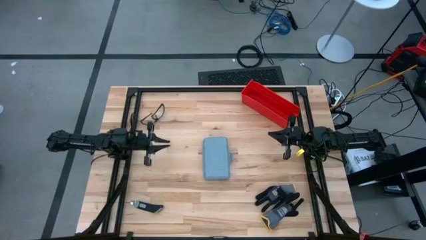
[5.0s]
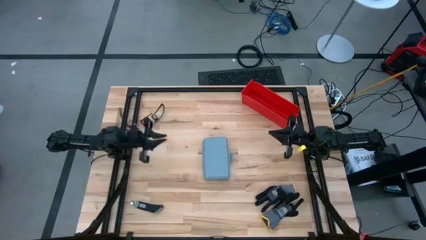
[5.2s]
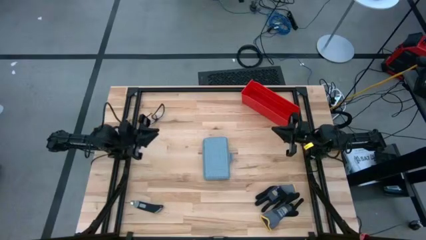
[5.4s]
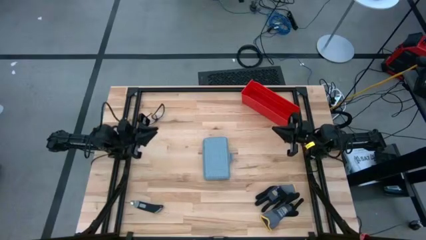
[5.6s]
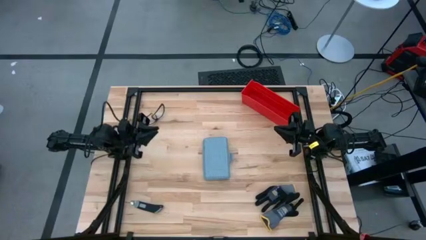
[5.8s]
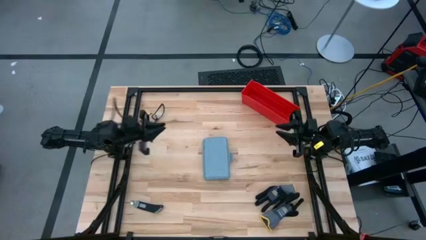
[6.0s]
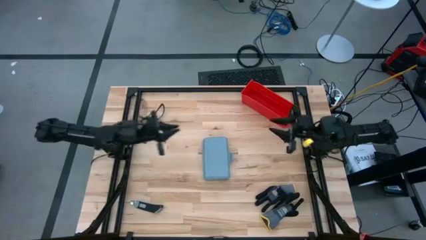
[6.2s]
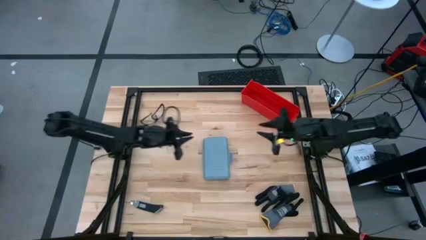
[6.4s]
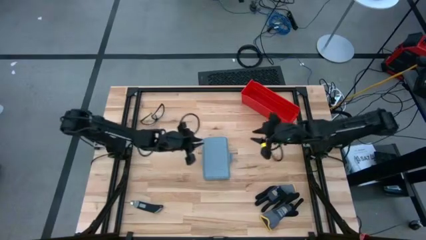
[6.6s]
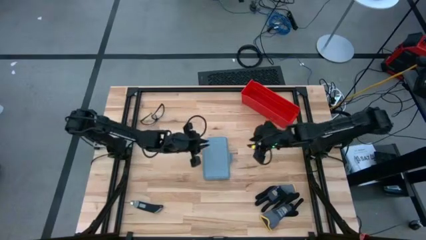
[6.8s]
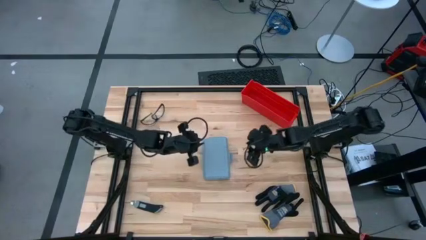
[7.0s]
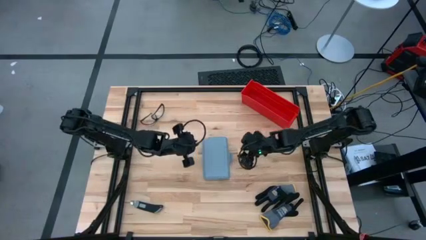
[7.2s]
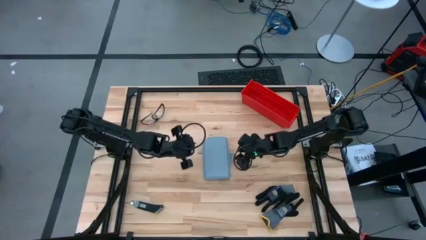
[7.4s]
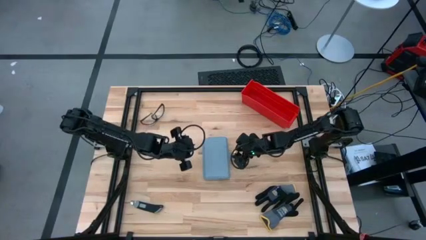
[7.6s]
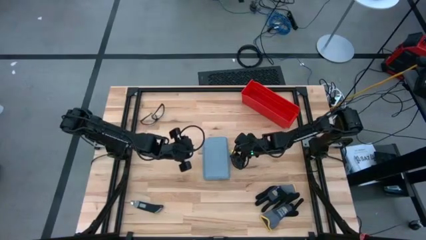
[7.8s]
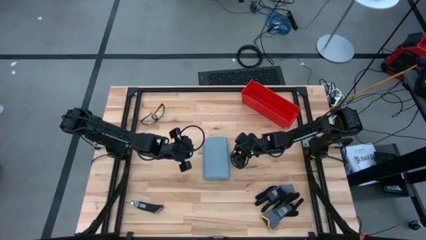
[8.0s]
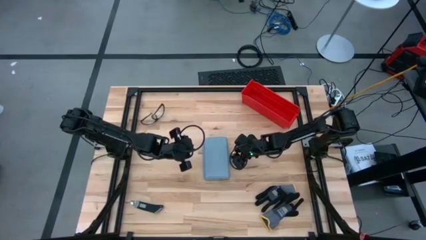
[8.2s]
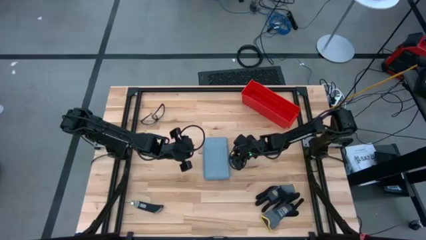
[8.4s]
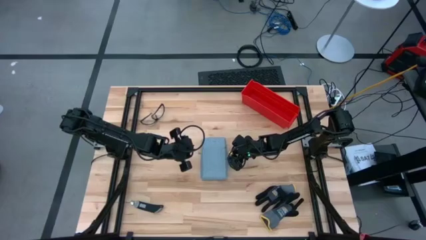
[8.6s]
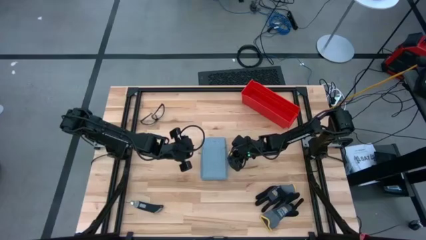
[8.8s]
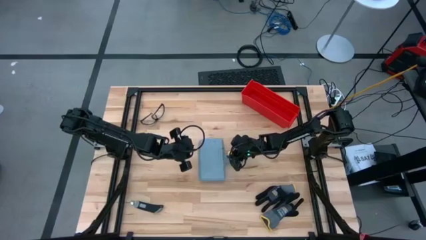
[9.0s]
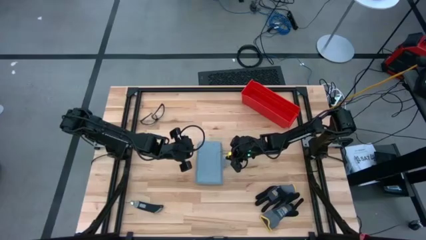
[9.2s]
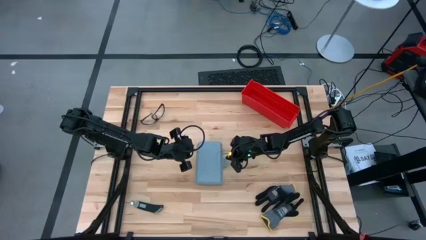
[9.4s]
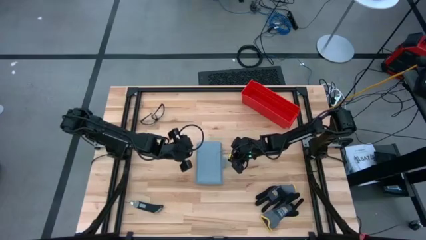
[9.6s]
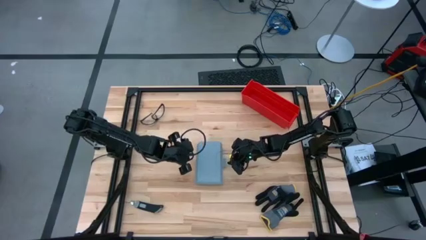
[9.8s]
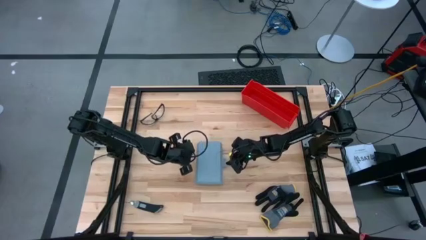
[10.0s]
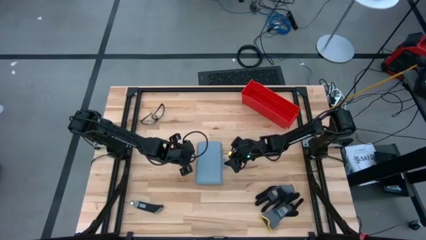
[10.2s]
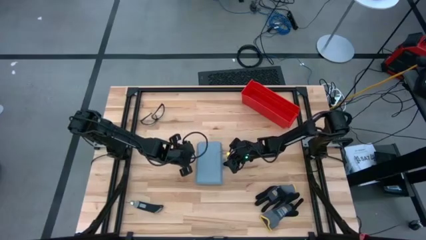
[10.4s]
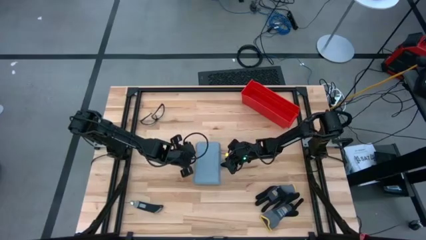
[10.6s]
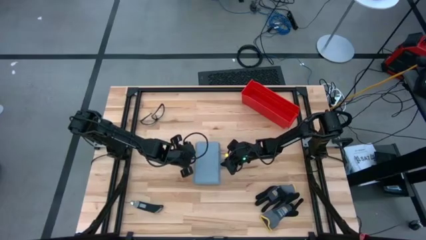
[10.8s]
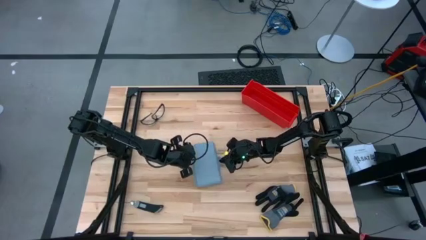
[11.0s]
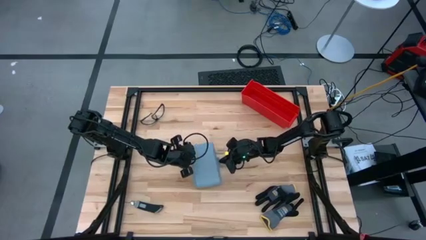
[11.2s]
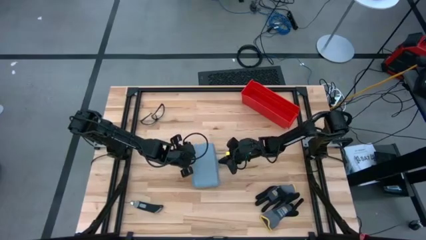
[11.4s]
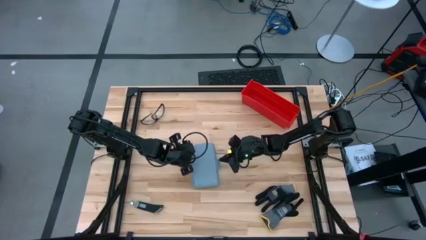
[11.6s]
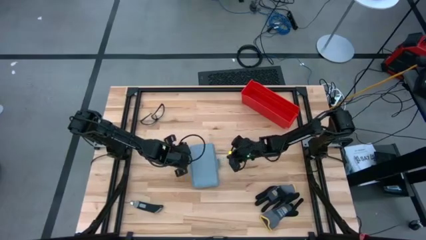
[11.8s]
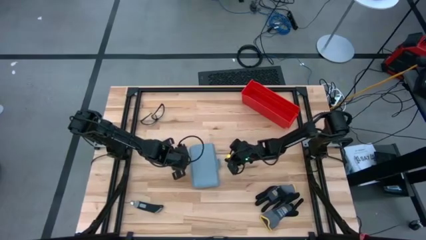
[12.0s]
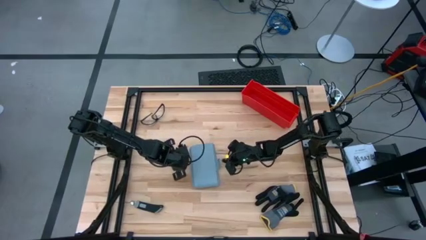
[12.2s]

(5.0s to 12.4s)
Task: prefit tool cases
Open the toolbox

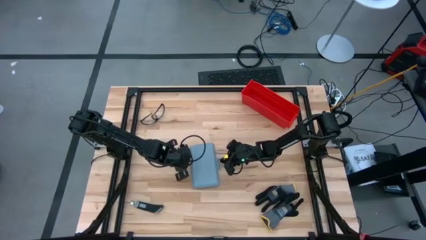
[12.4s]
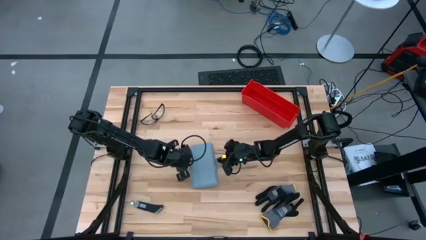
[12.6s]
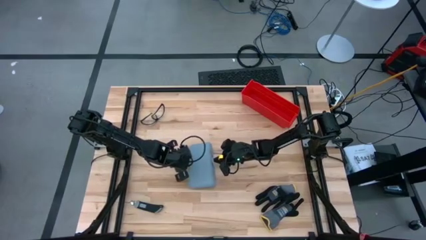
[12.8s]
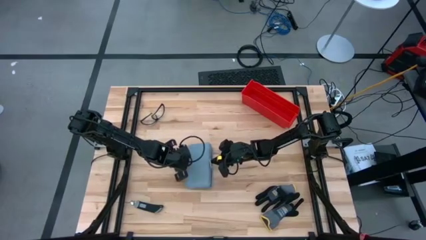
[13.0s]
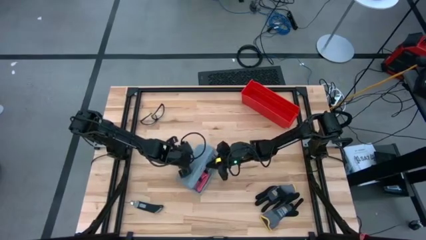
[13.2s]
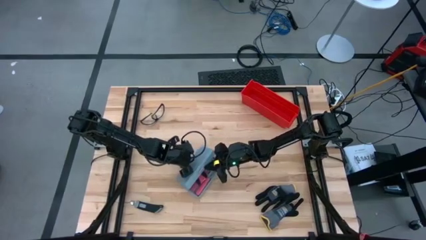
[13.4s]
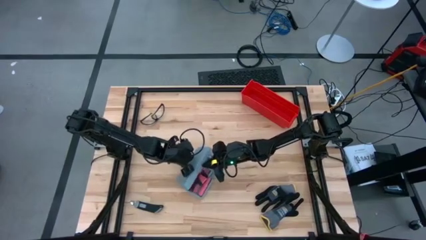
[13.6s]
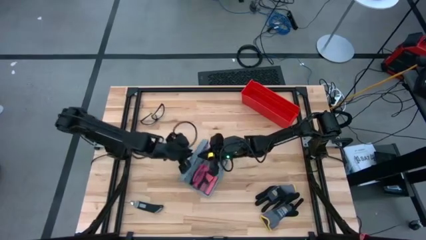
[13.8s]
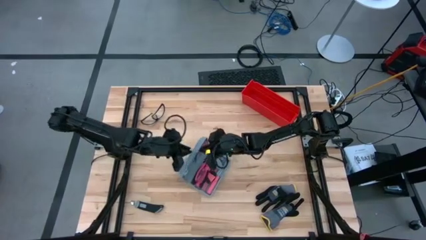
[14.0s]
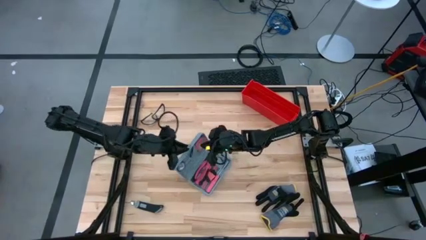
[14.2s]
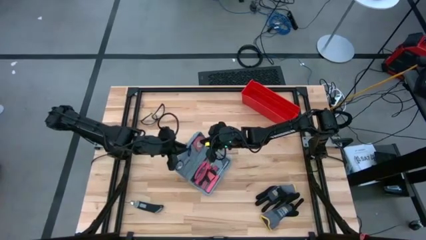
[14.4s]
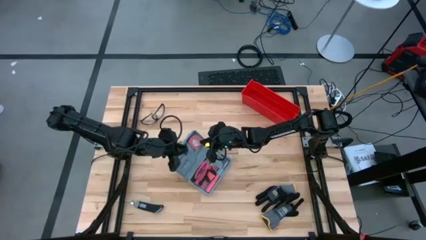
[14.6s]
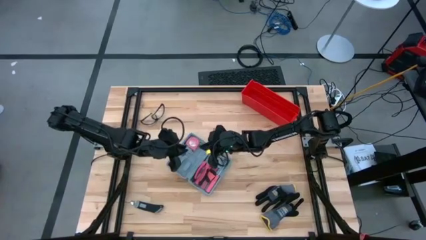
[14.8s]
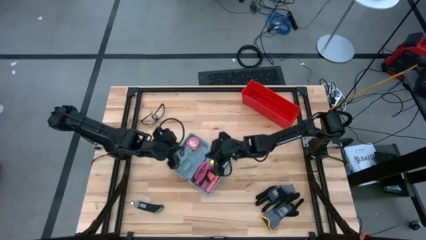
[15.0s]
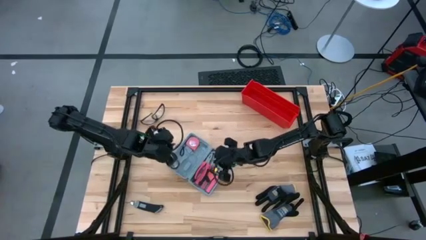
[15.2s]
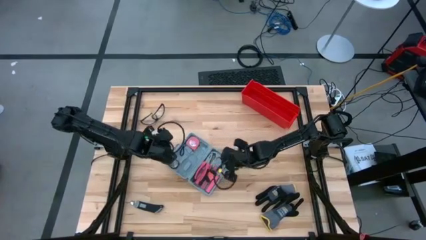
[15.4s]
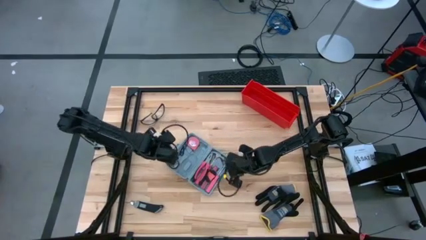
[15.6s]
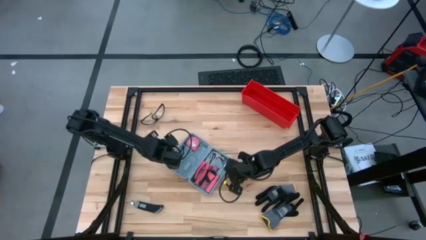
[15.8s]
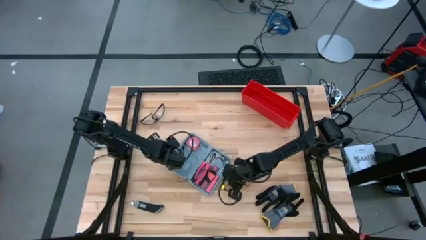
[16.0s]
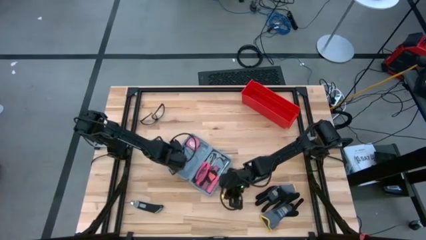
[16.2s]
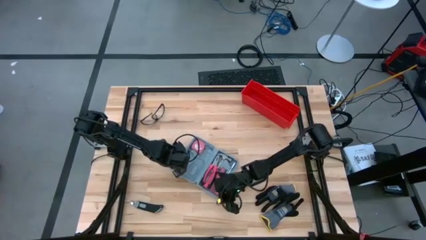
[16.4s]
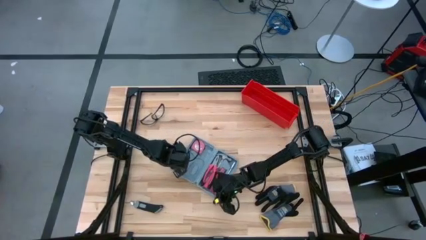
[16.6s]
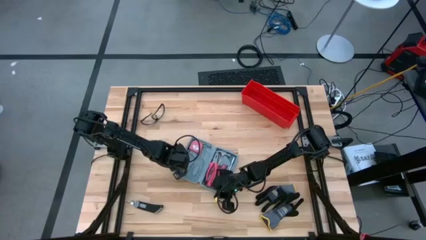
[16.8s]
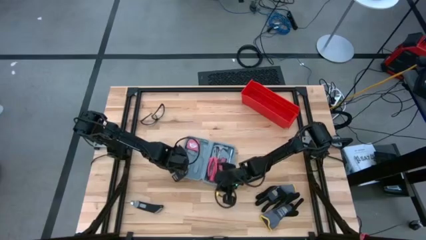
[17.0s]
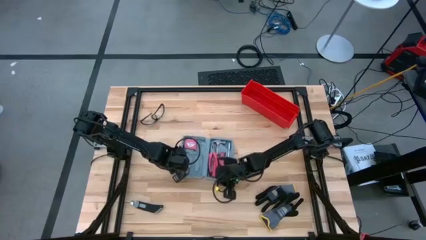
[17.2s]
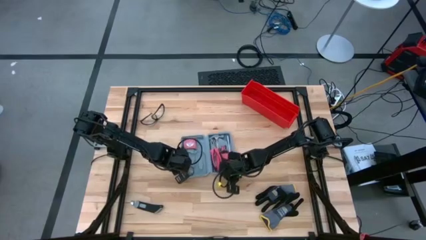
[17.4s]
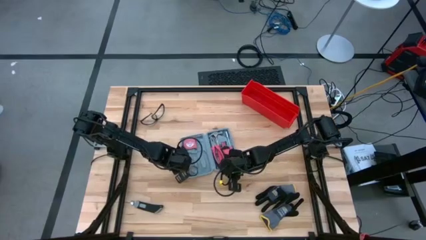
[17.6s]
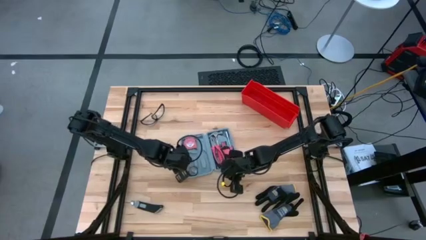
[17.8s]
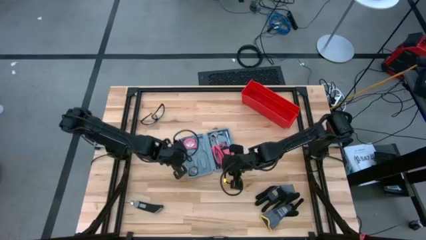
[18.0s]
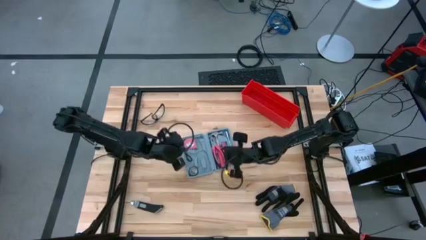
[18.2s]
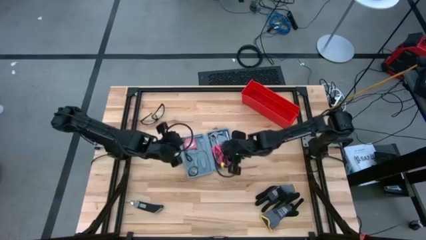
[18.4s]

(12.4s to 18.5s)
Open the toolbox

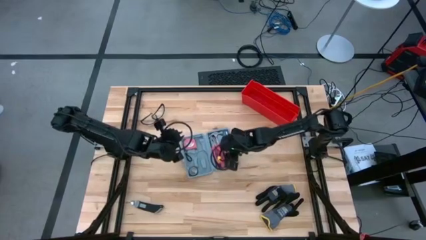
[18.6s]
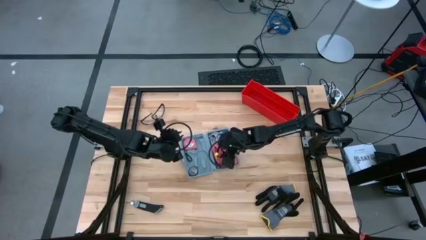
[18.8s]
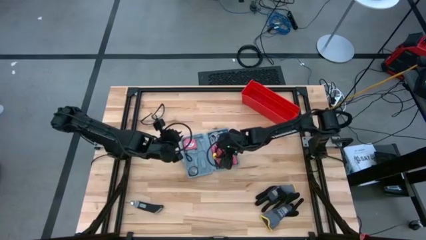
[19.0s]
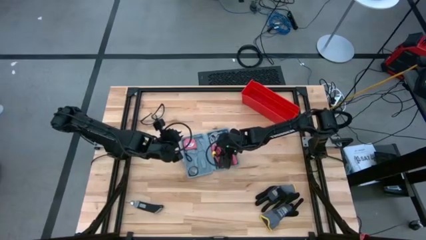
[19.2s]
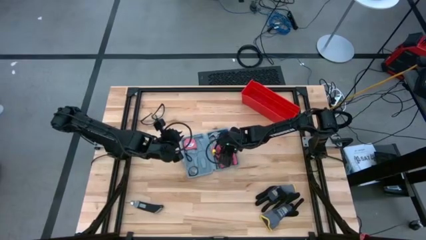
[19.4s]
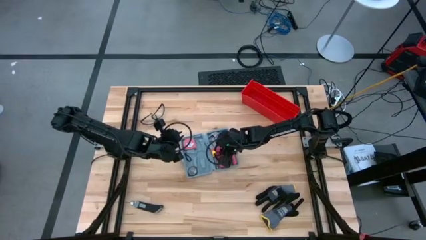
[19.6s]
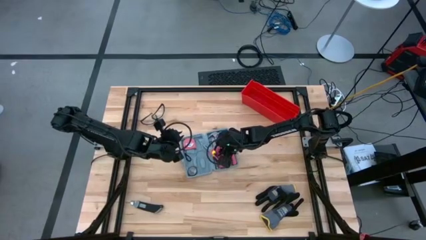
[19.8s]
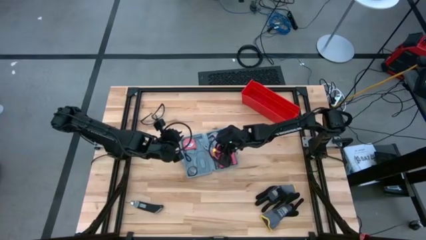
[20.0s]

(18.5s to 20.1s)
Remove the pliers from the toolbox

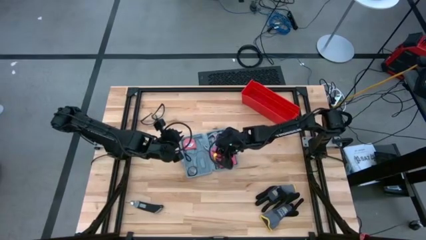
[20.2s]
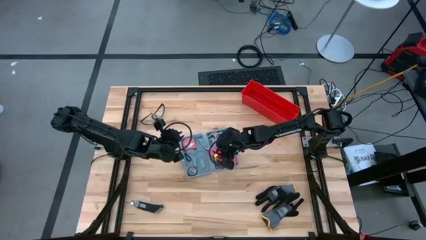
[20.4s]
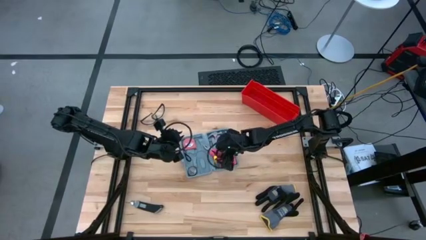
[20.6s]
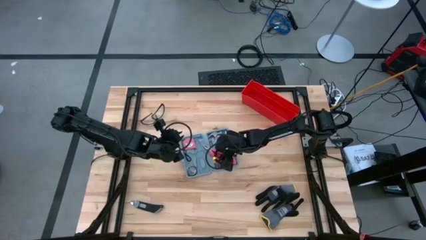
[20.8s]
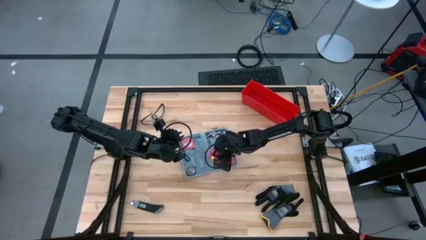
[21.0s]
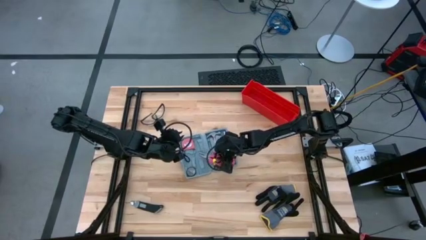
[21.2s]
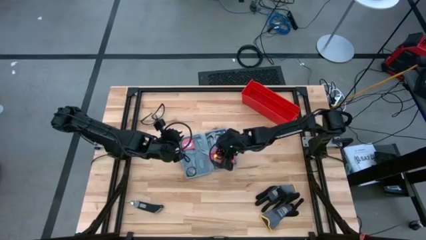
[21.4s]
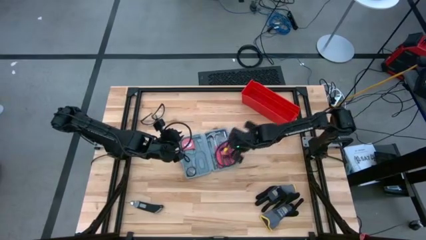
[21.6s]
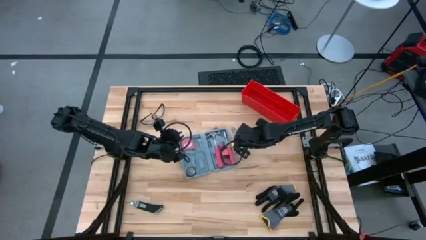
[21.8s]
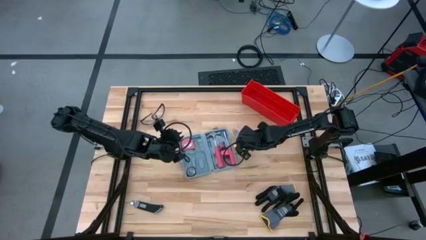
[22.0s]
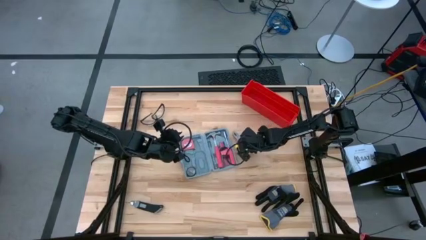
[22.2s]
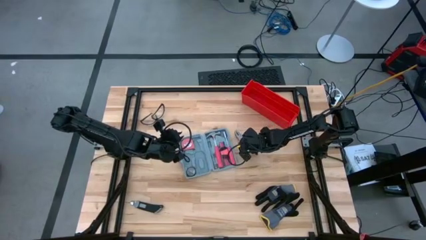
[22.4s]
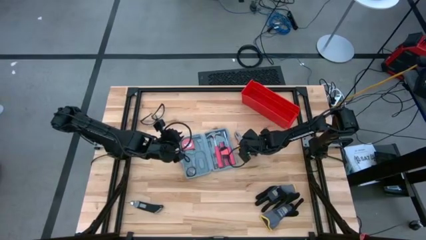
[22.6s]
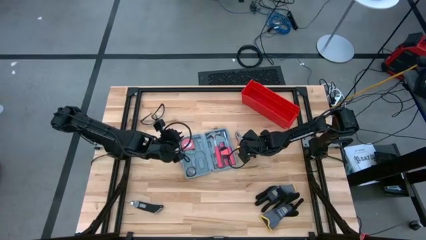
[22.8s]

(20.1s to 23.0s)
Remove the pliers from the toolbox
